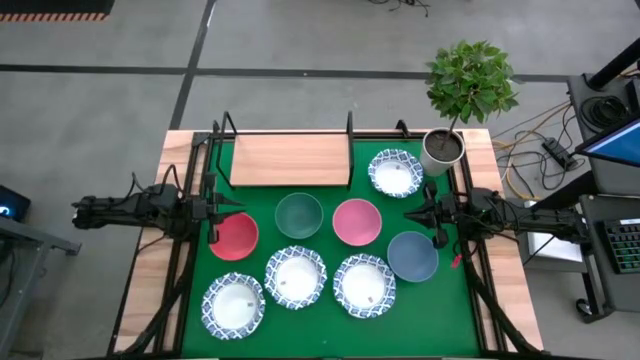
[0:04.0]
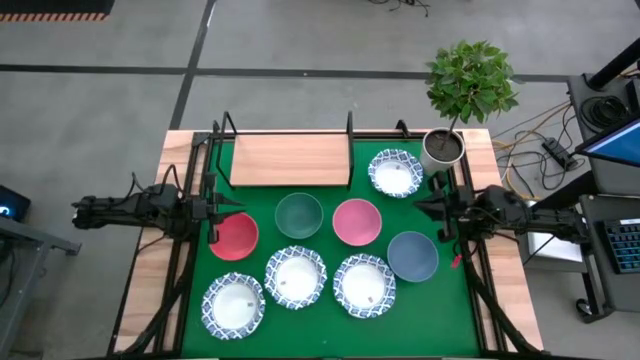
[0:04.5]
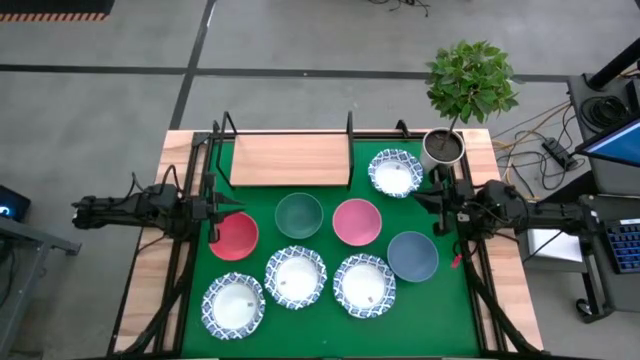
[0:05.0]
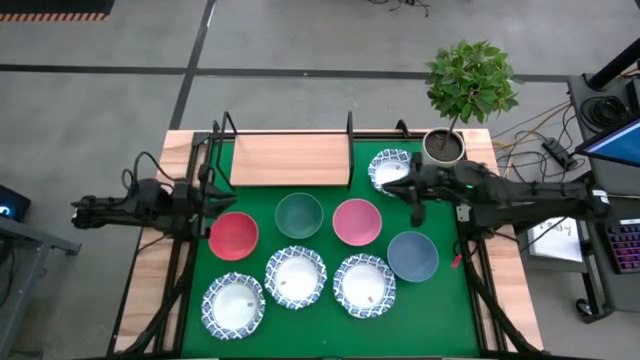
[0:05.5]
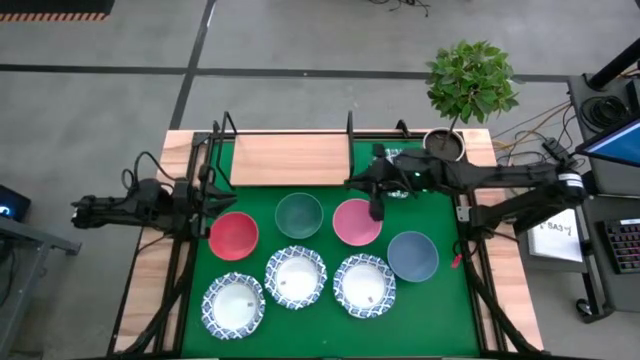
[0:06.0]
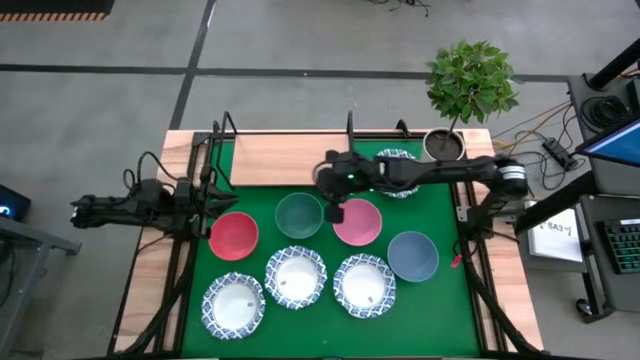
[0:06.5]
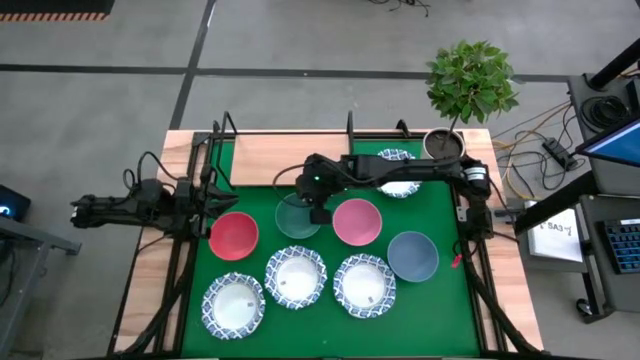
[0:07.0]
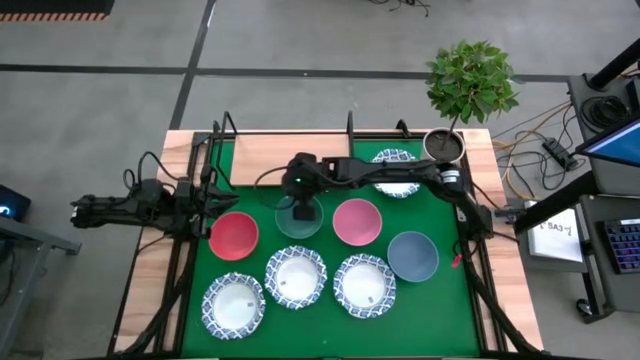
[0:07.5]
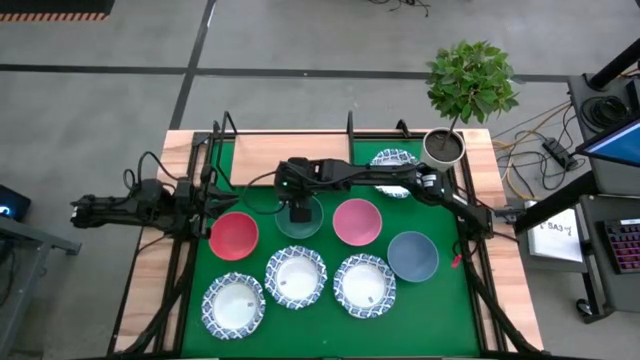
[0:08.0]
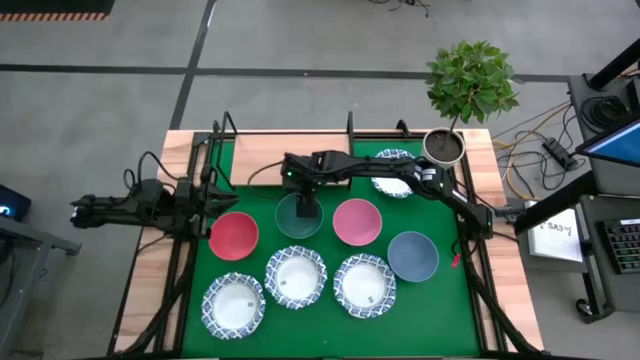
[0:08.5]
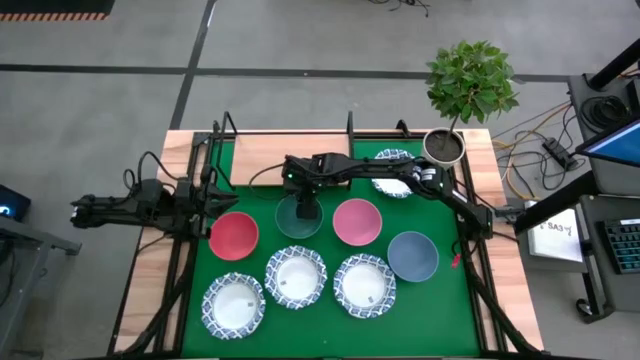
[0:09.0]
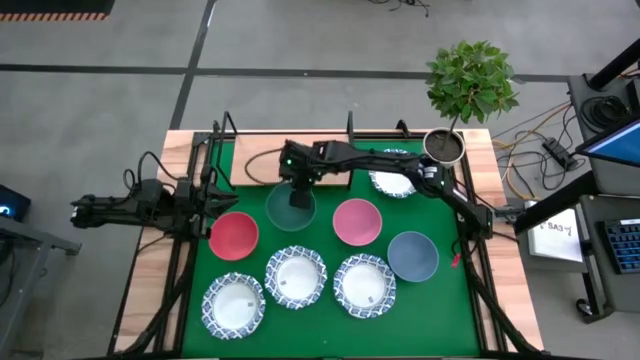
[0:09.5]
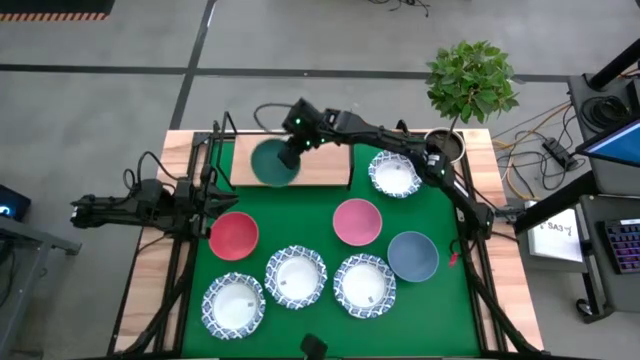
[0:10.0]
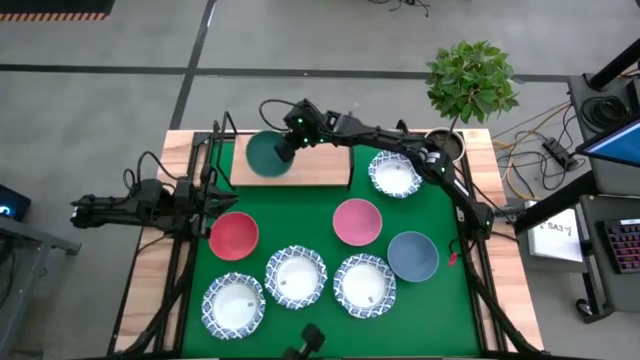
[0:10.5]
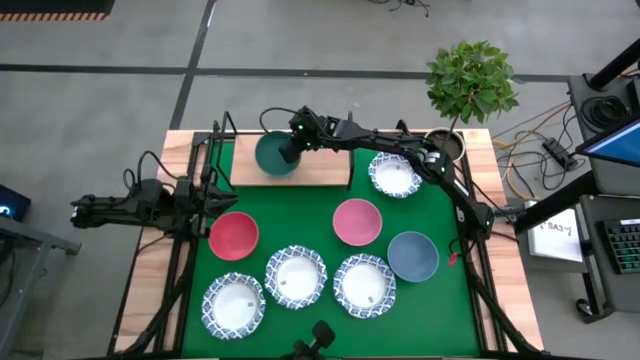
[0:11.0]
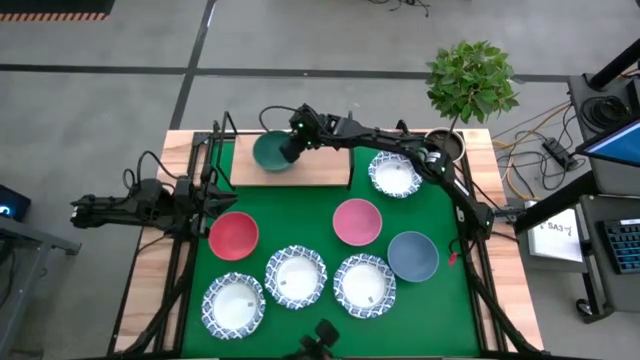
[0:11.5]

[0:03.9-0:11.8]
Task: Place and stack bowls onto a shelf
Put the green bowl on the shelf

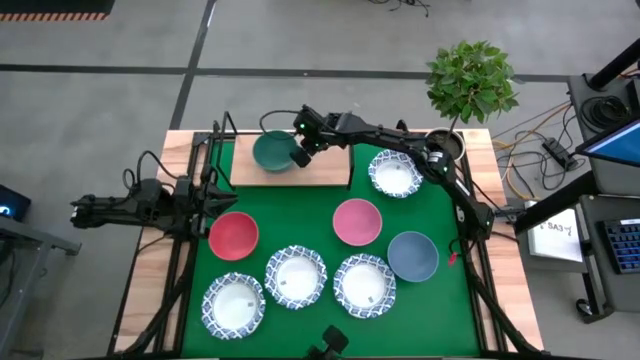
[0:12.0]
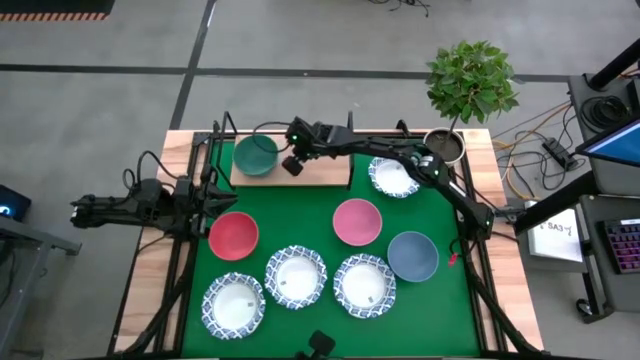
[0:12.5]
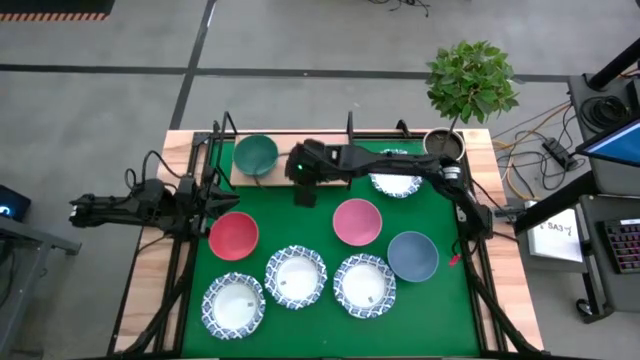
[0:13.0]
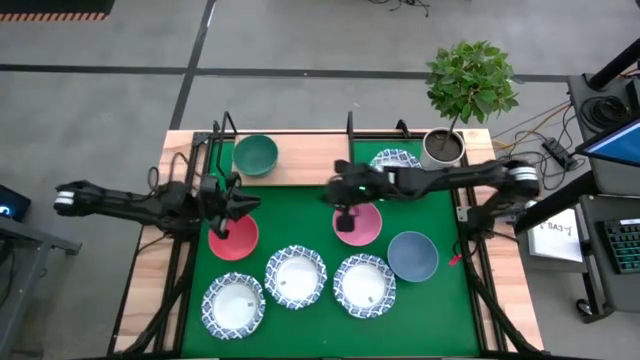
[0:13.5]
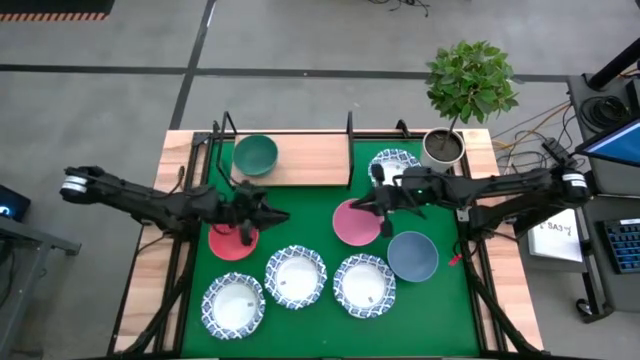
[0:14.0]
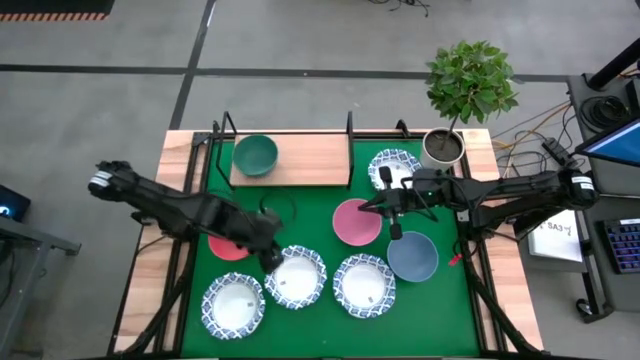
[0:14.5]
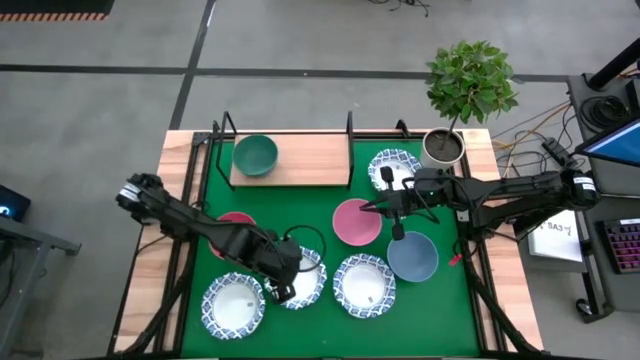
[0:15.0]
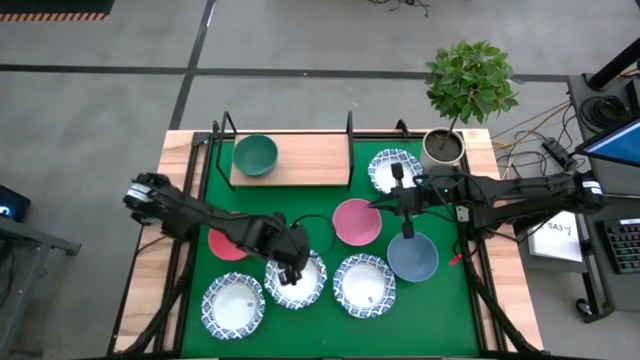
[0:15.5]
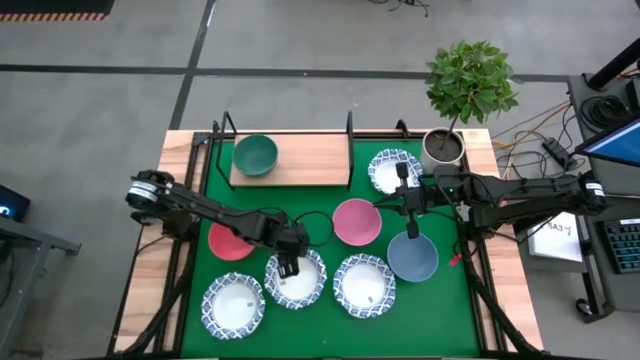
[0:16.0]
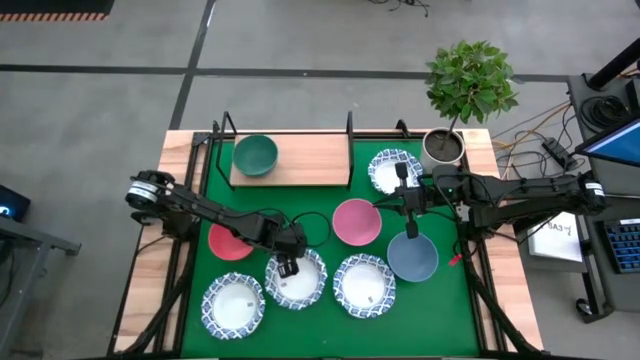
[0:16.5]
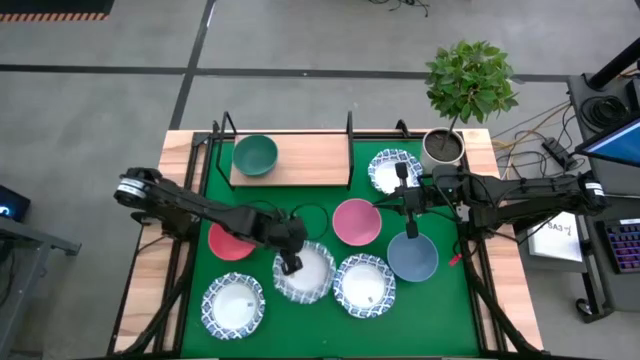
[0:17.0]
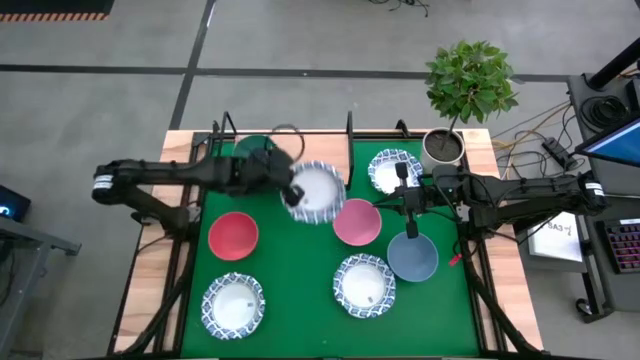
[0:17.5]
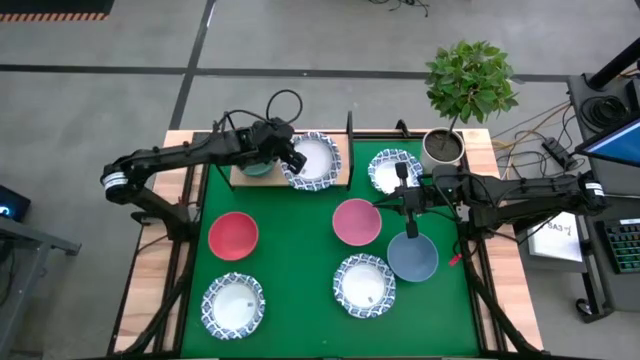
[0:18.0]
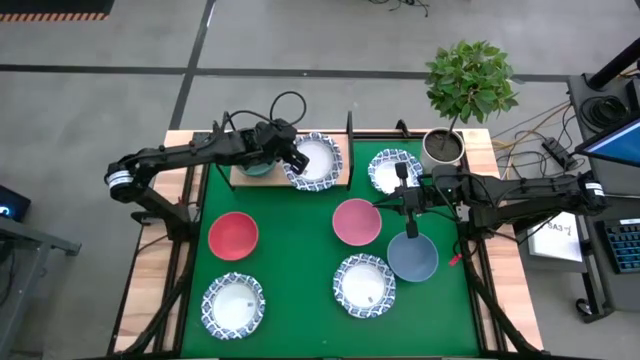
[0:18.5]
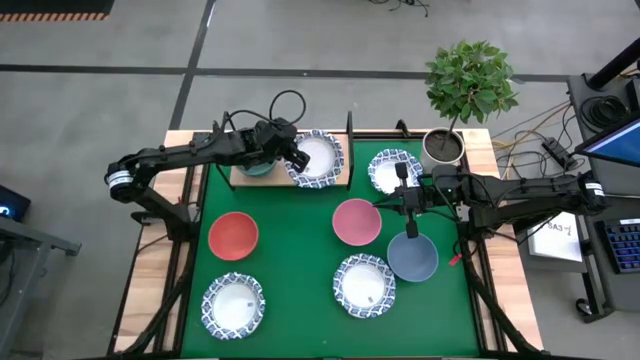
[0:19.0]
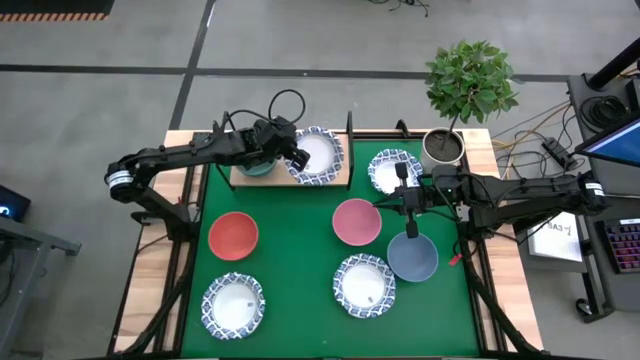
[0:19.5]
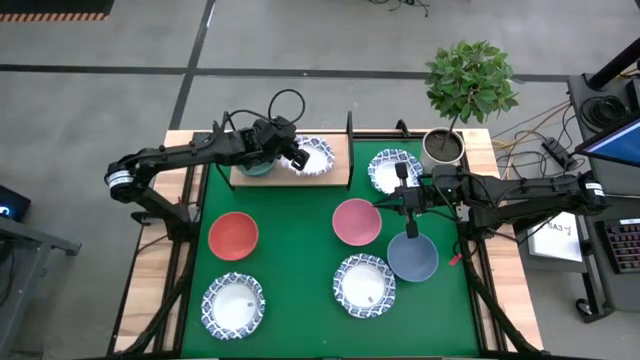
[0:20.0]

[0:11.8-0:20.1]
Put the white bowl on the shelf

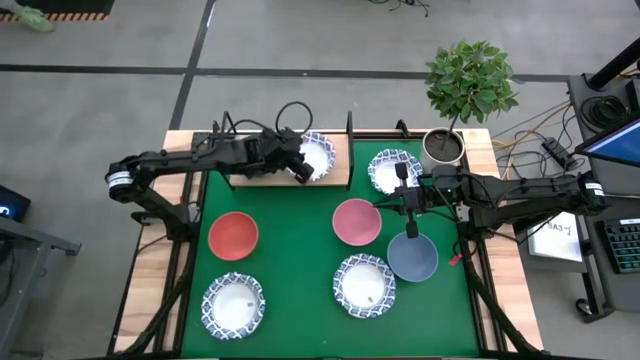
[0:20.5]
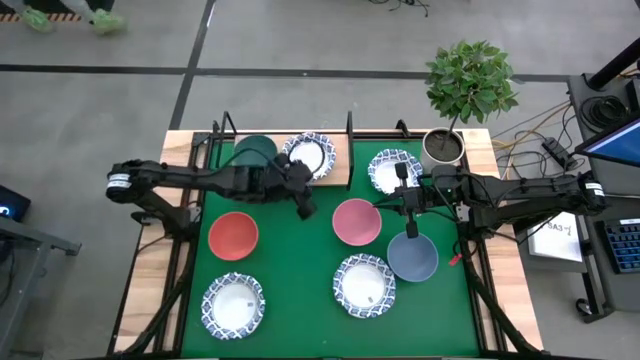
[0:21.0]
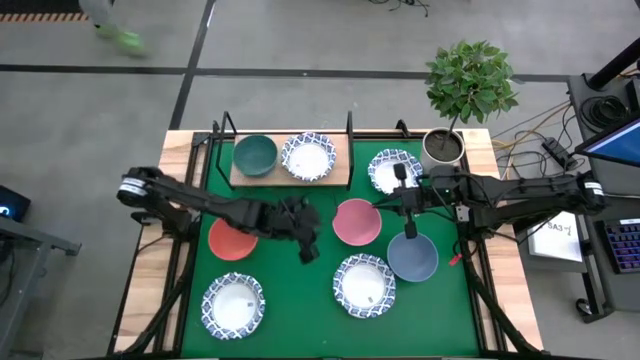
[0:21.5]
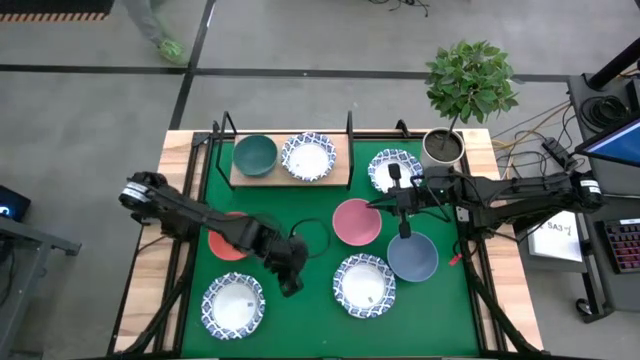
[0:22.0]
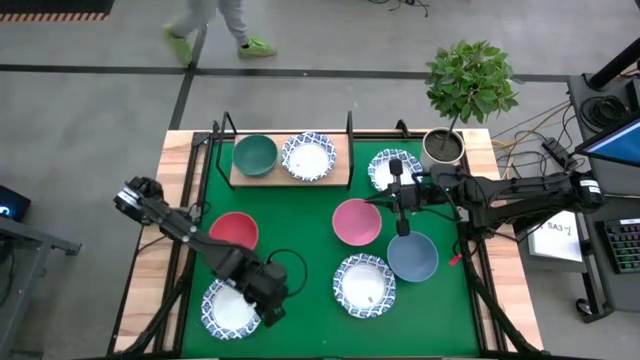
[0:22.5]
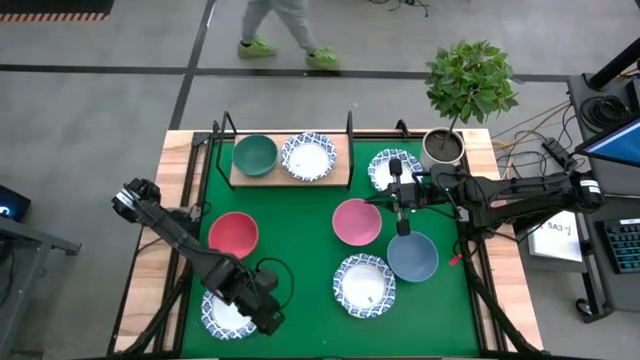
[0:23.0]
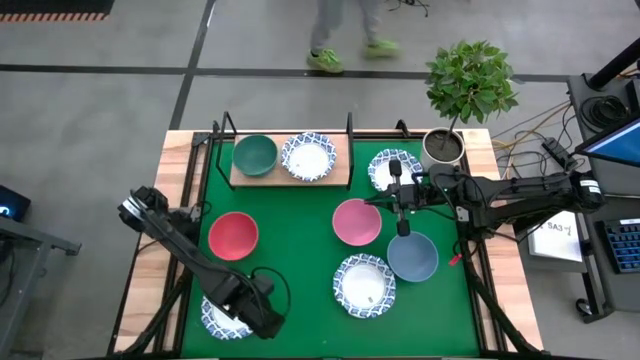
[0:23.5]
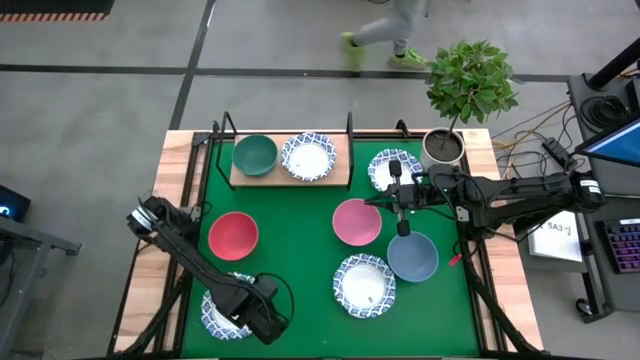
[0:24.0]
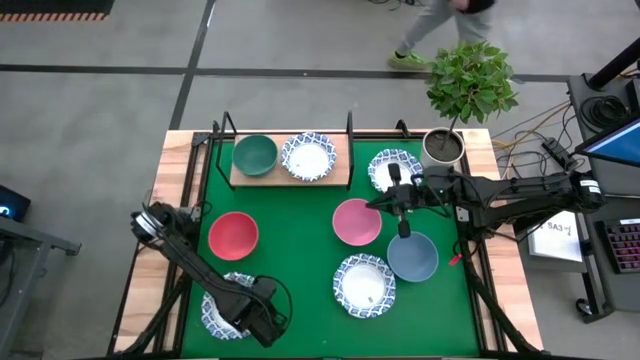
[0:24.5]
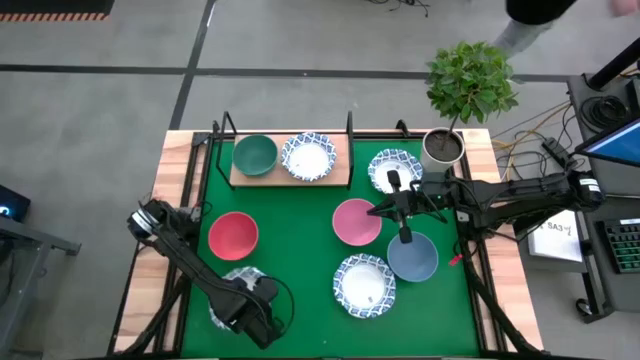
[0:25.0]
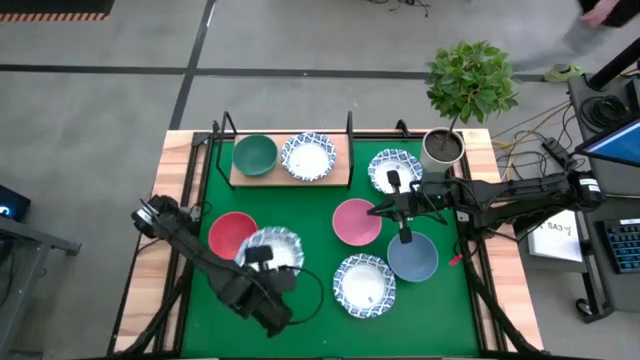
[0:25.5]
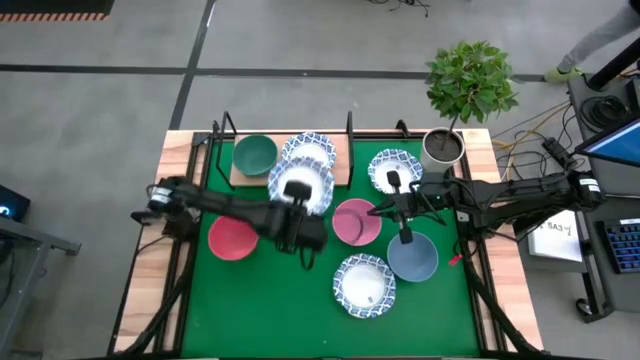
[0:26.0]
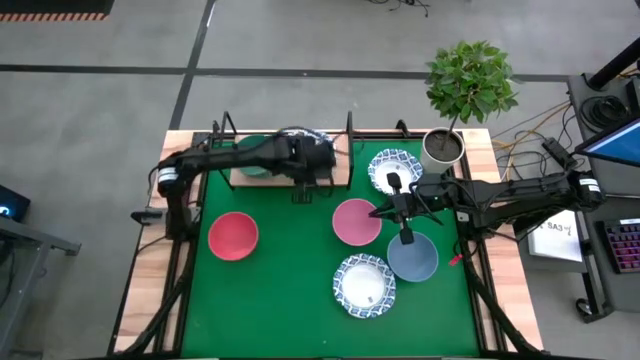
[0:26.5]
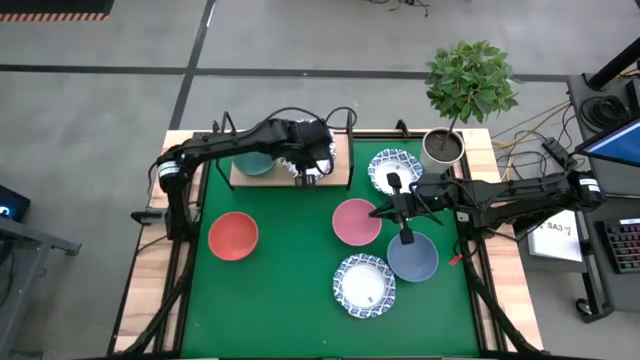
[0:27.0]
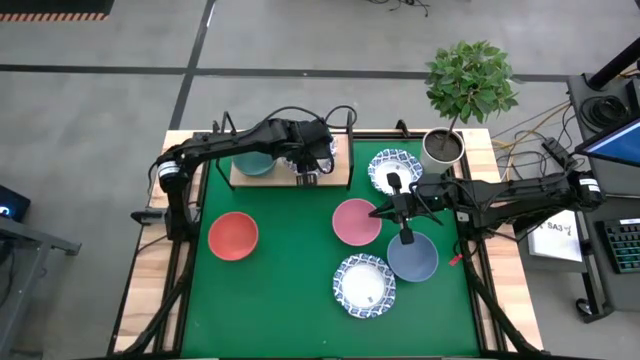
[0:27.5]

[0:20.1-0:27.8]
Stack the white bowl on top of the white bowl on the shelf
